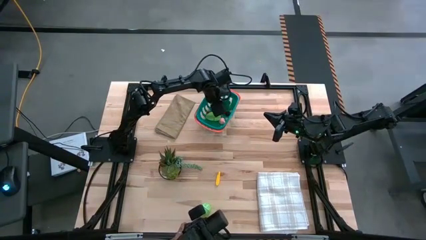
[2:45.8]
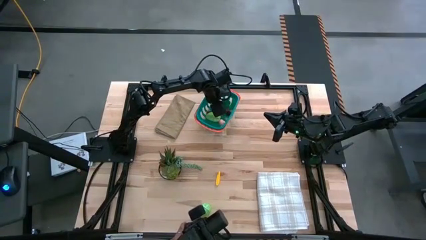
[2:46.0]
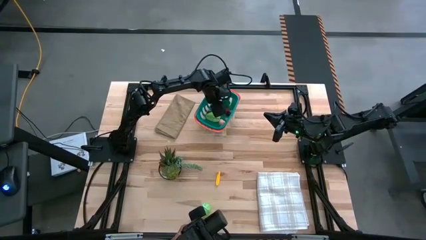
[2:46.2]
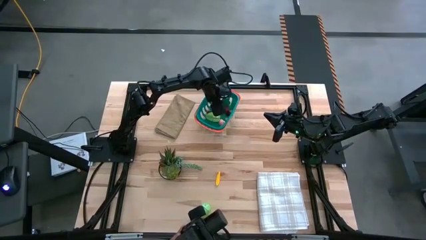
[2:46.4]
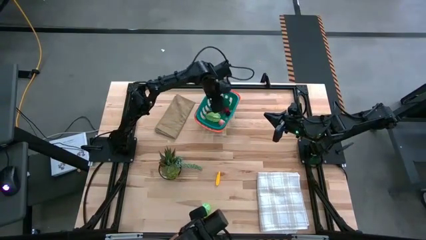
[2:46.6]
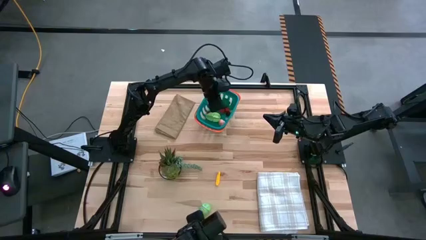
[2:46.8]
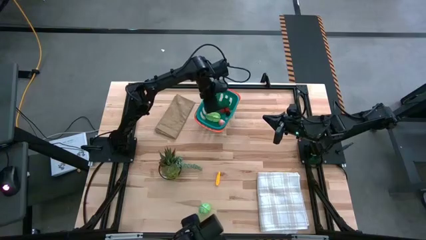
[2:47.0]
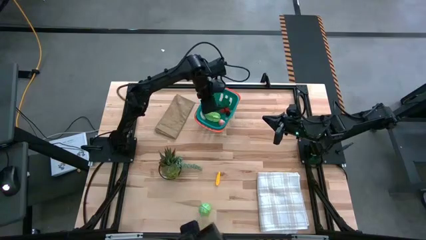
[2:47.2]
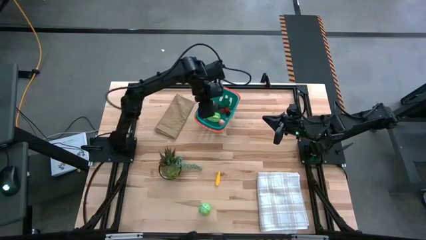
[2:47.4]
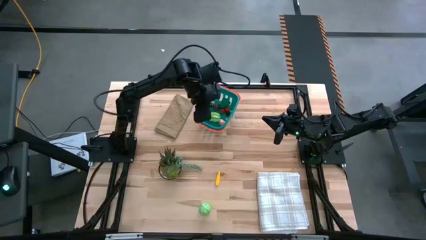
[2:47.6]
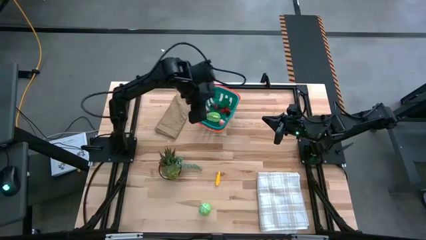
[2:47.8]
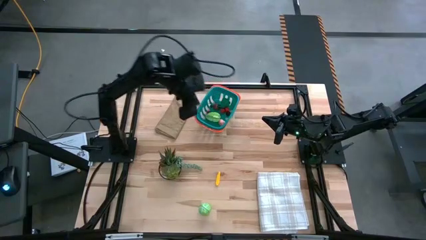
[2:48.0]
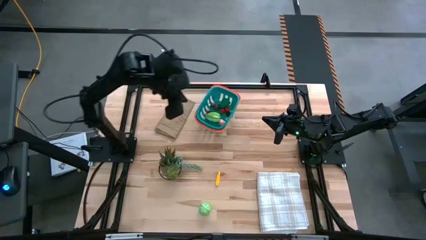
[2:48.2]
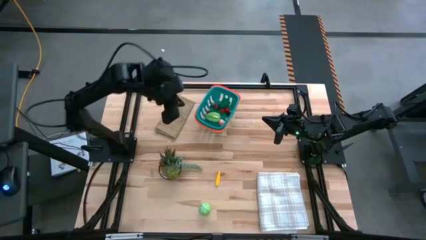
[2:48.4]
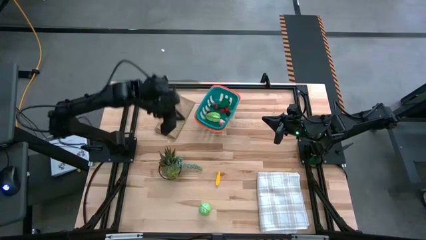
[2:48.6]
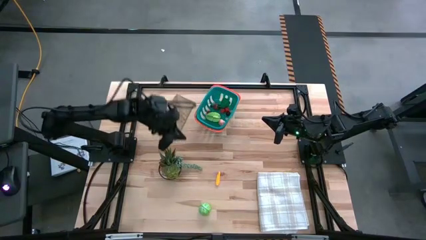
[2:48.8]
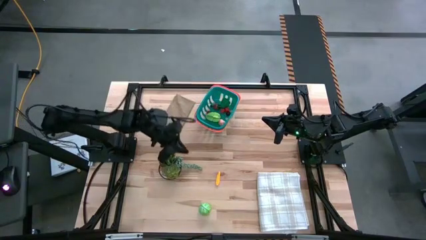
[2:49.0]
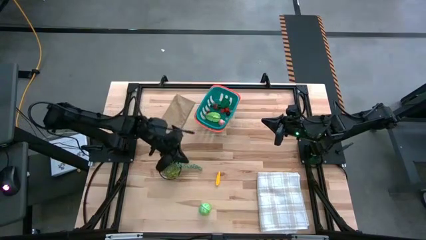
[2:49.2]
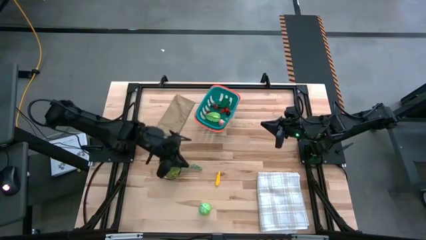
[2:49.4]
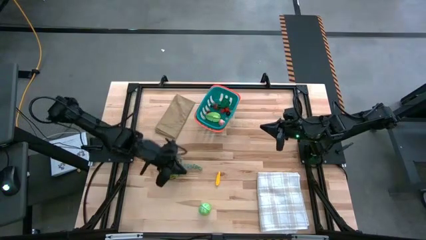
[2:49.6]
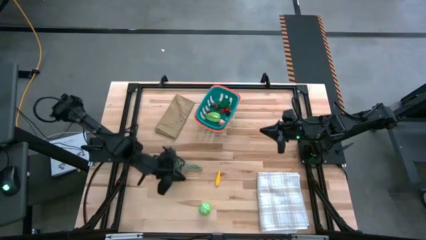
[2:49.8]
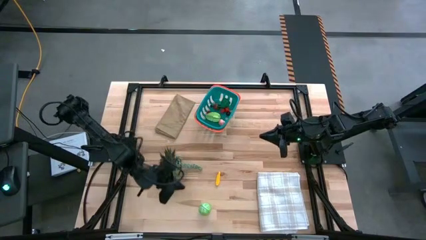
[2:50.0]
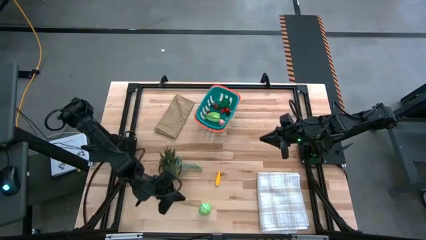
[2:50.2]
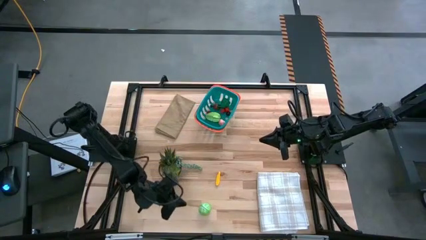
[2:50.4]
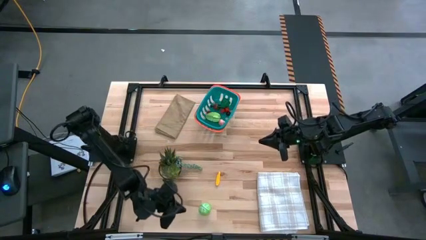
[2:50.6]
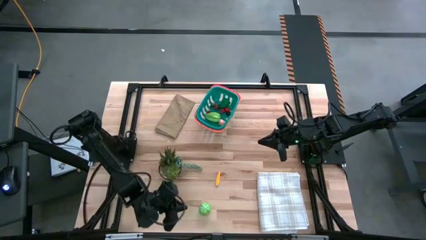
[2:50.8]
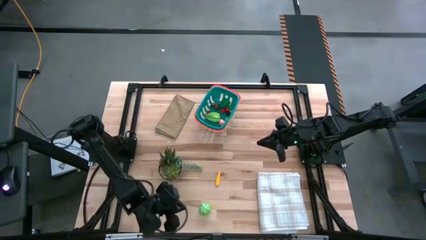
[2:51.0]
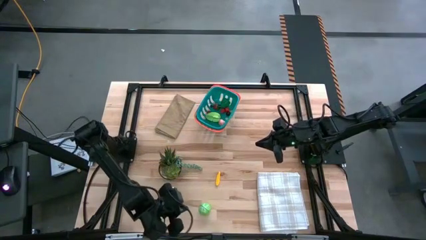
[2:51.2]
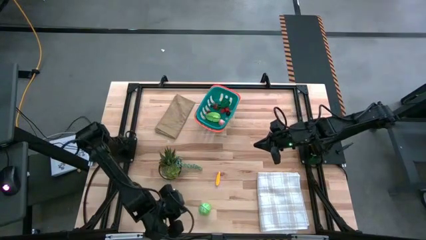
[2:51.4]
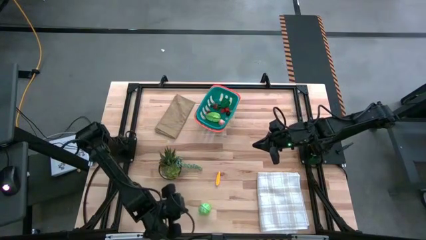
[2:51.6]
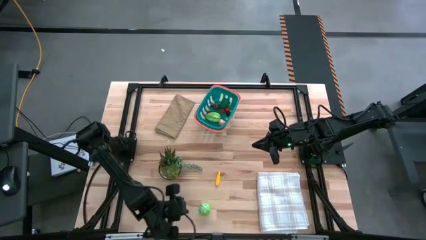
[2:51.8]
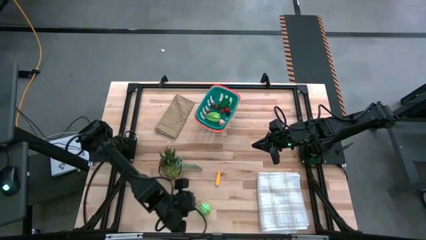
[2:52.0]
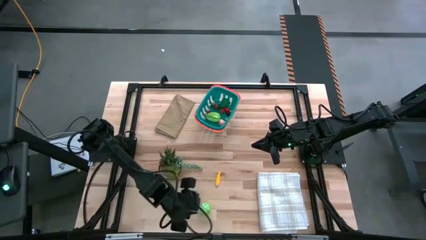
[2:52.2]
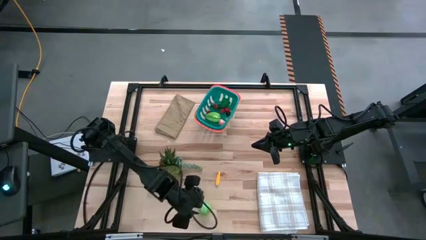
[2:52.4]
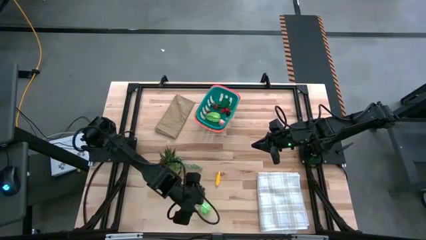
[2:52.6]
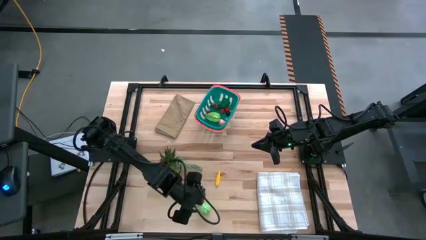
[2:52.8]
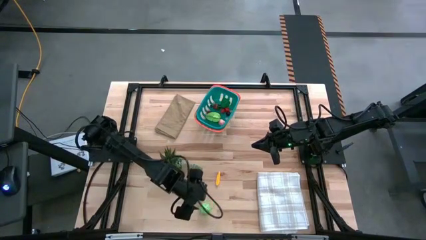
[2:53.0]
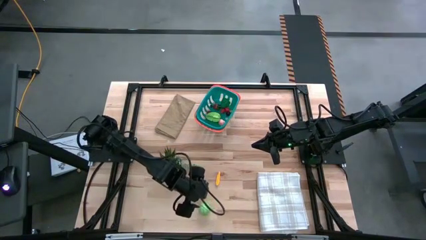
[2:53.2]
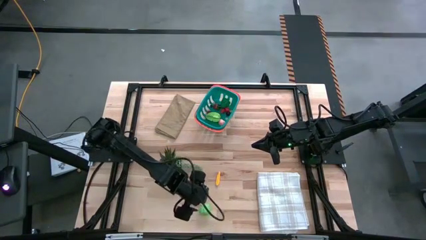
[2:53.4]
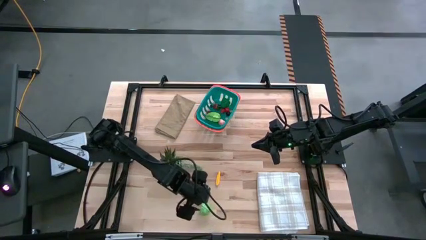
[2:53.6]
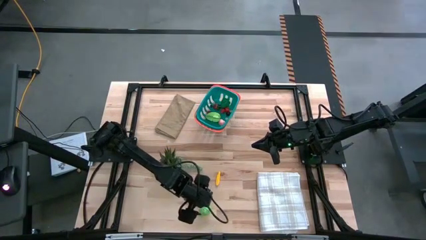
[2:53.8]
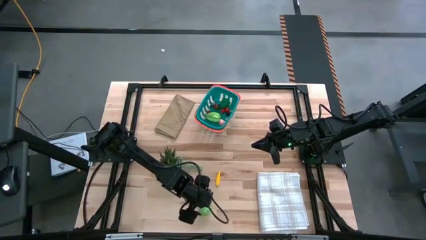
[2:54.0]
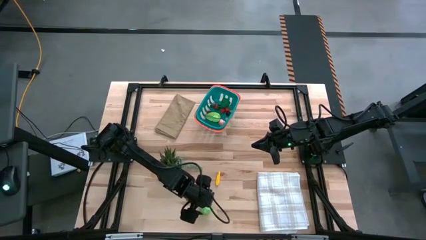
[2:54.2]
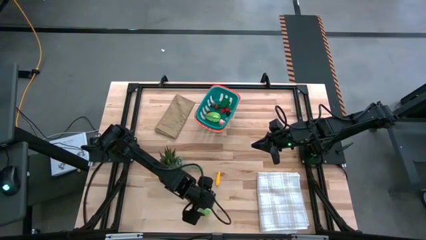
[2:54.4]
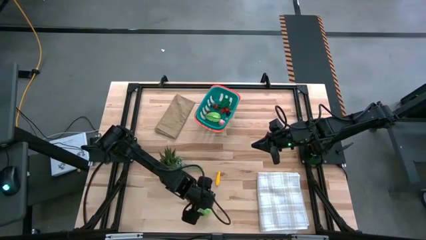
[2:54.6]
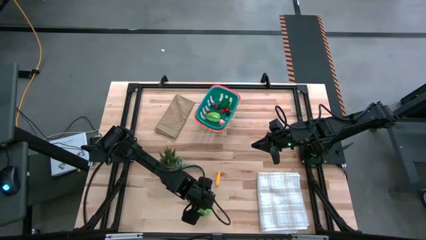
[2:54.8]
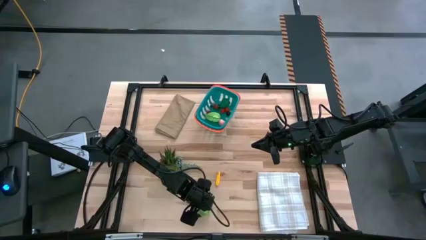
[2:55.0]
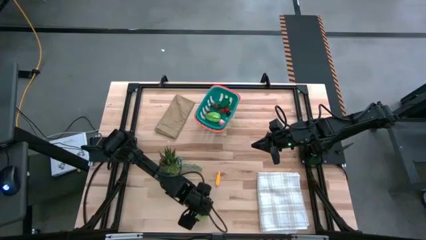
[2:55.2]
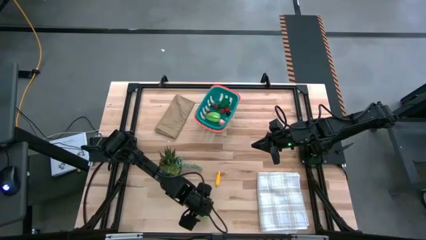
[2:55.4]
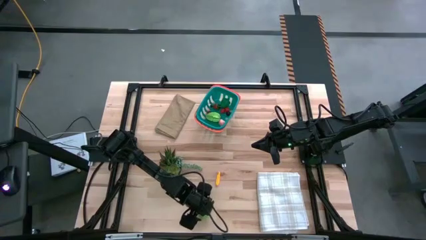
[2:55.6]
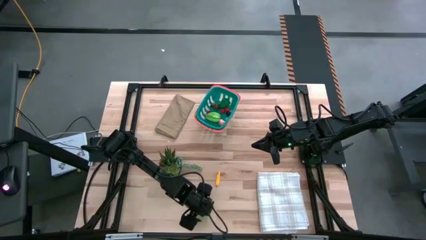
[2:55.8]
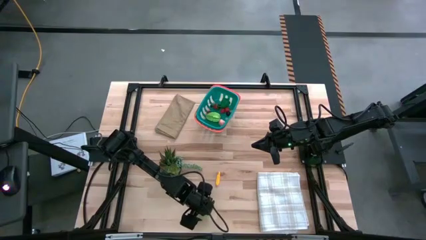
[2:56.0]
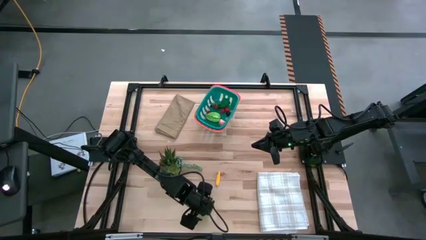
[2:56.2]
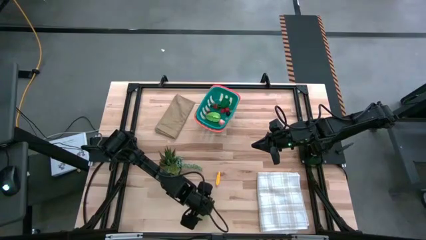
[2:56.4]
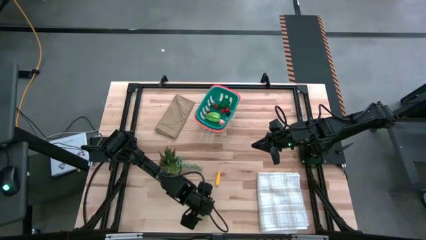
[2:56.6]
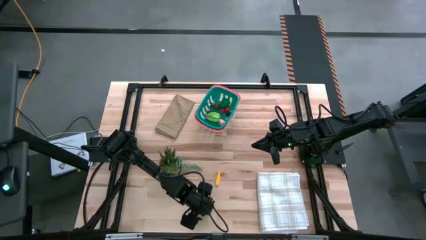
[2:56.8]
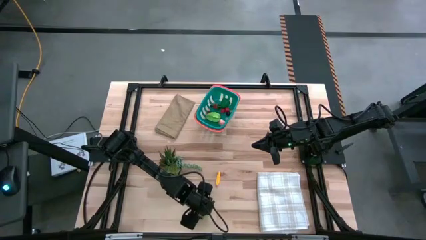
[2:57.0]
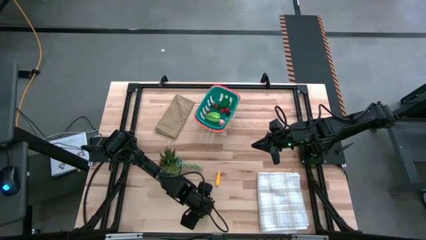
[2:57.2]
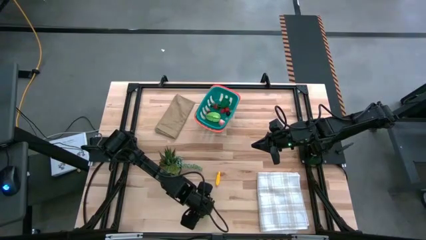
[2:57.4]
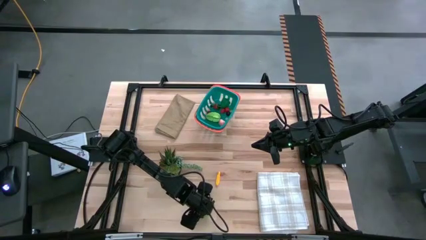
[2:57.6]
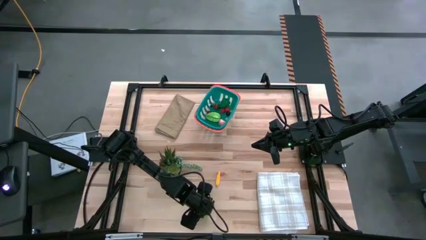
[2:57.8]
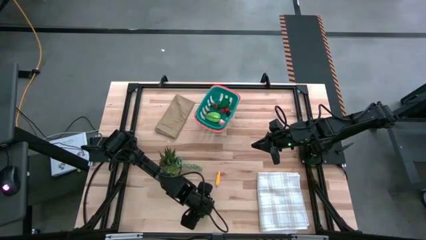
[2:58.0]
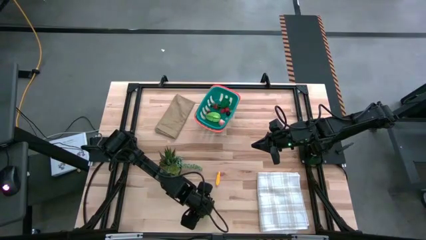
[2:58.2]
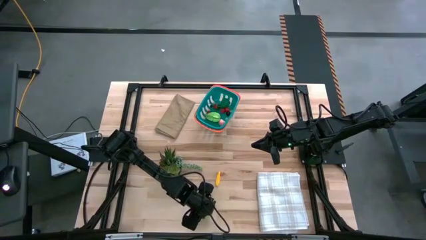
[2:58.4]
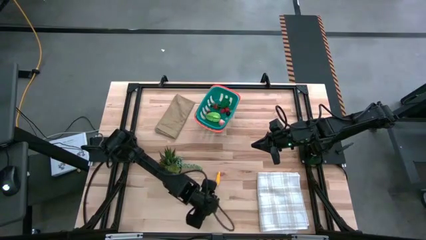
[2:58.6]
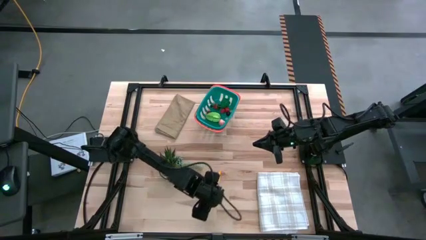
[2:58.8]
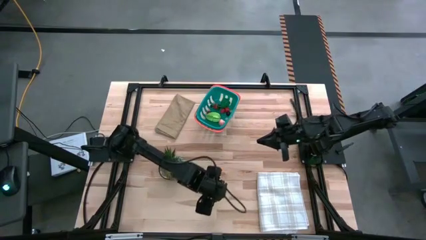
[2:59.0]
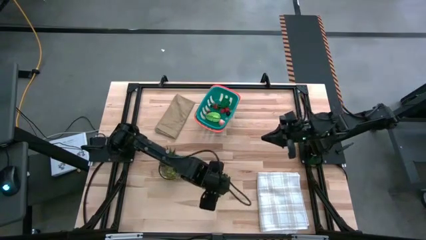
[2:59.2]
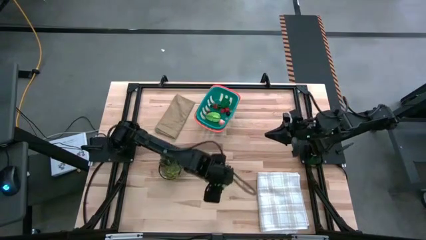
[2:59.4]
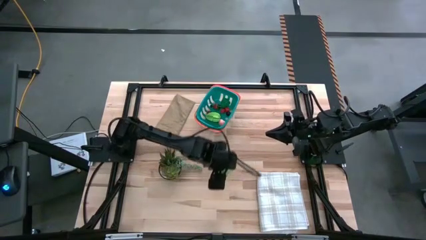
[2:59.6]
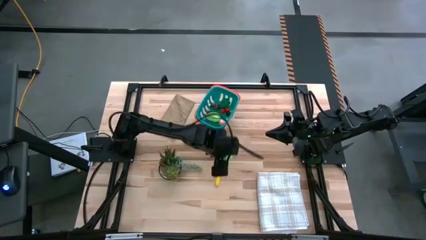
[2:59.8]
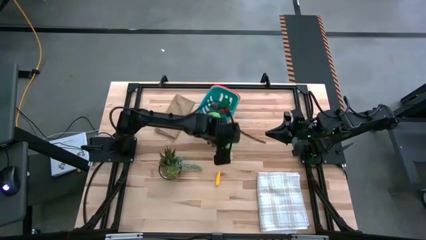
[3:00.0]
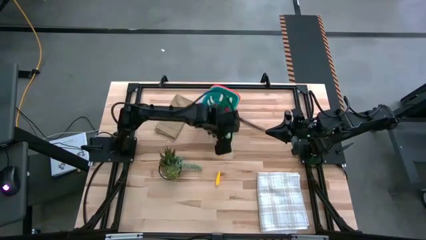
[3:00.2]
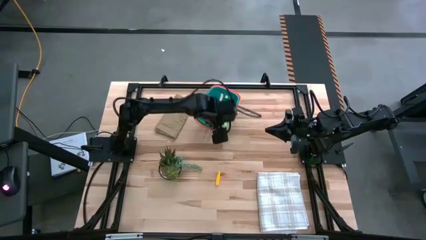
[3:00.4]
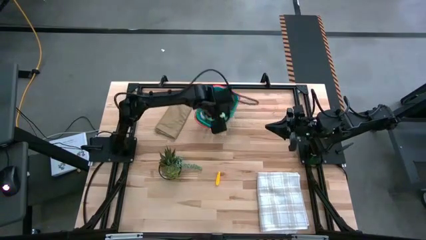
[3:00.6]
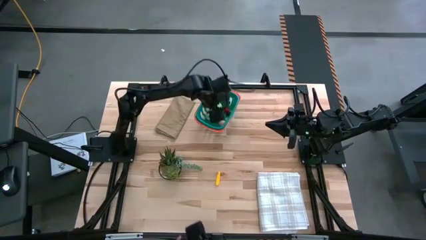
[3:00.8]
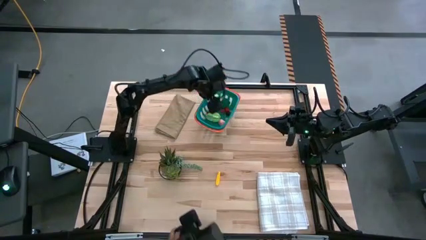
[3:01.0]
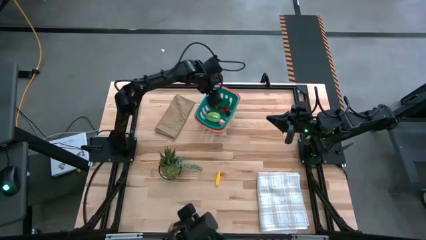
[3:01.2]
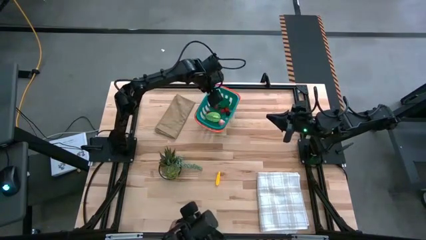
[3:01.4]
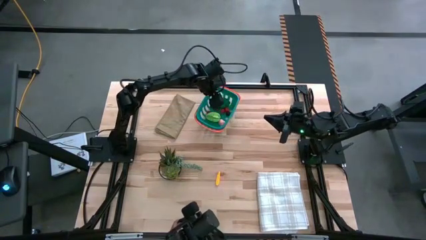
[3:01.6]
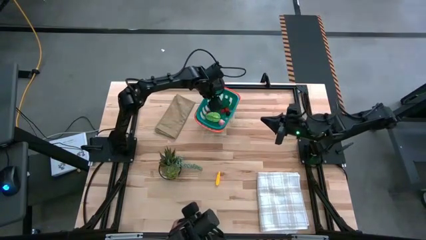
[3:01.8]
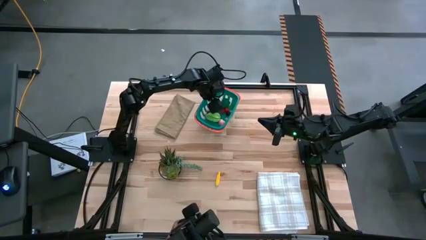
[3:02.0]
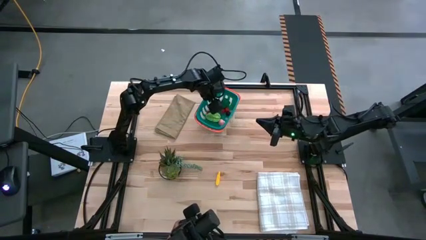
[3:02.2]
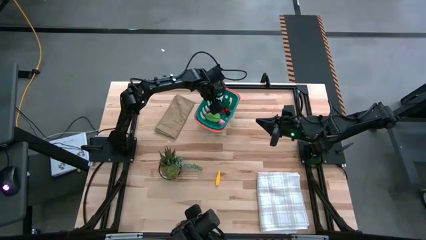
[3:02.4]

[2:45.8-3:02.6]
Task: Pick and placing Produce into tupperware
Put the green cabbage in the green basket
